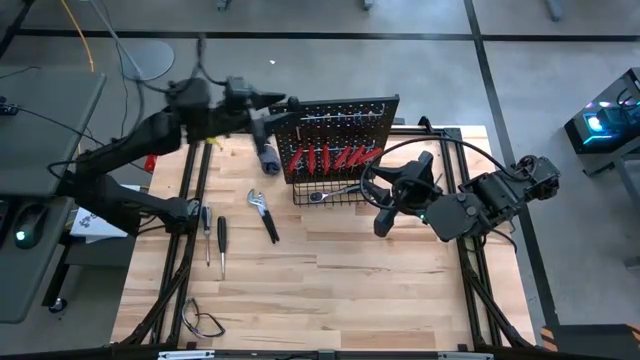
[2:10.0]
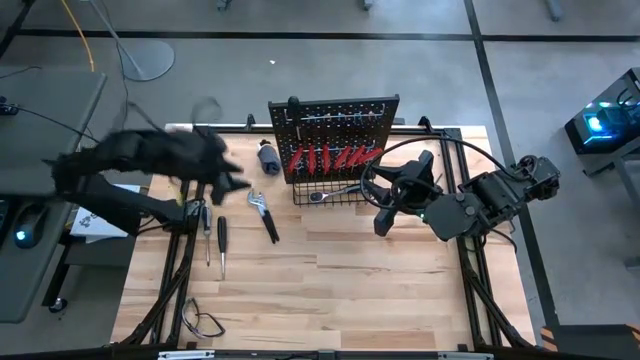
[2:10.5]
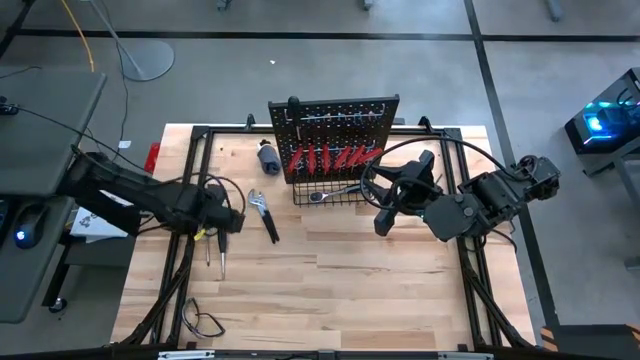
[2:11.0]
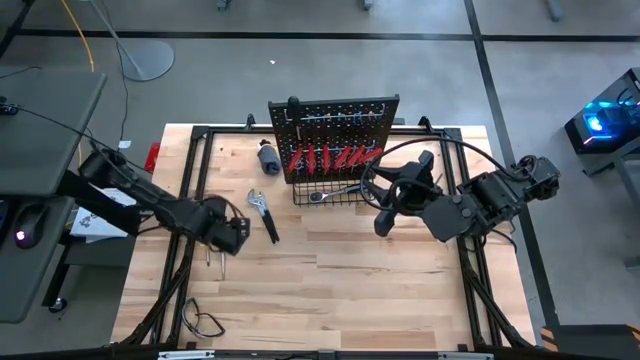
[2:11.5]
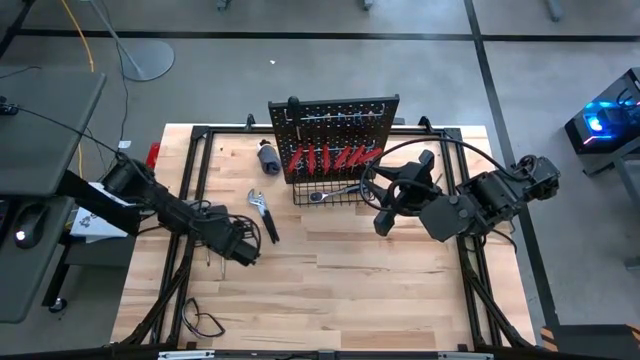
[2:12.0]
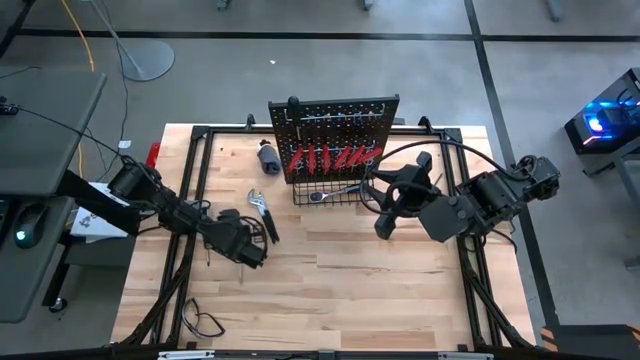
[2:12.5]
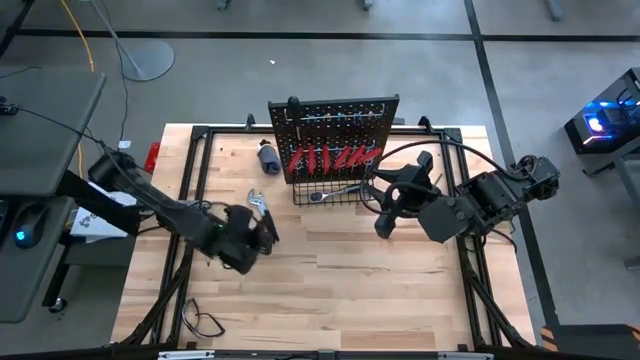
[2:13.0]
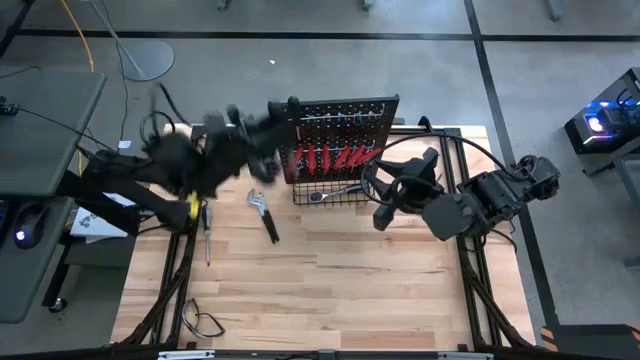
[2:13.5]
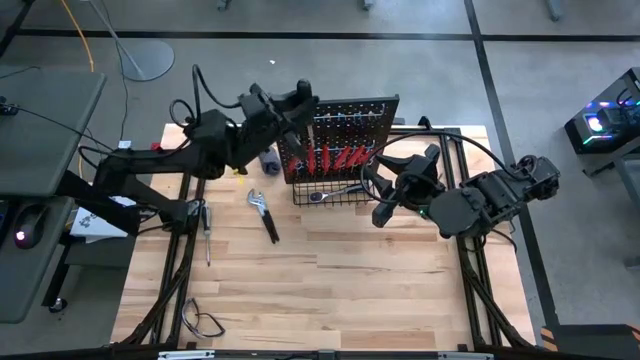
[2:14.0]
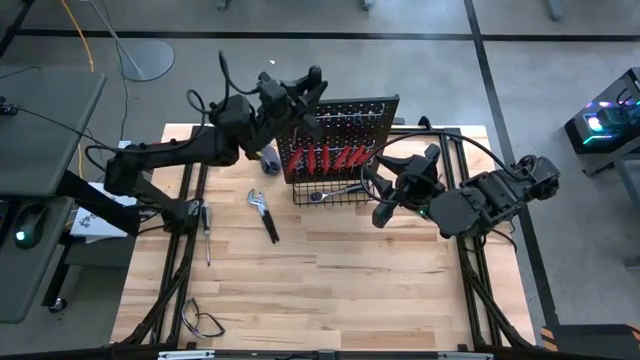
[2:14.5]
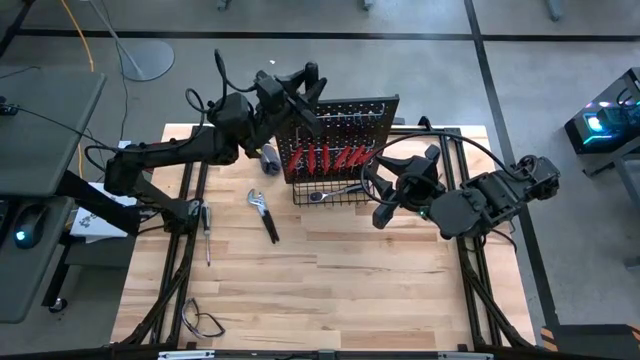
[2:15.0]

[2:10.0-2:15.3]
Task: Hang tools onto peg board
Hang the black screwdriver on the peg board

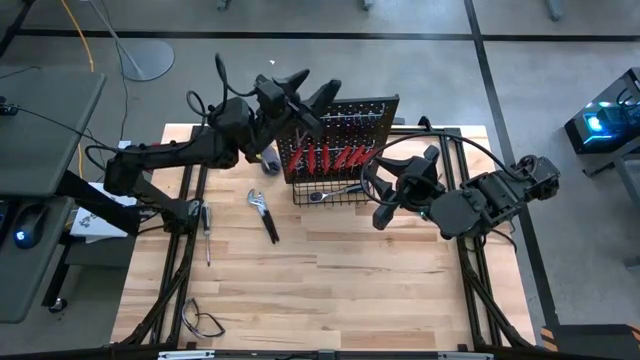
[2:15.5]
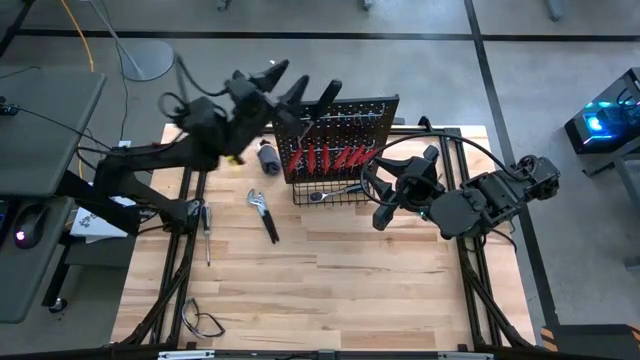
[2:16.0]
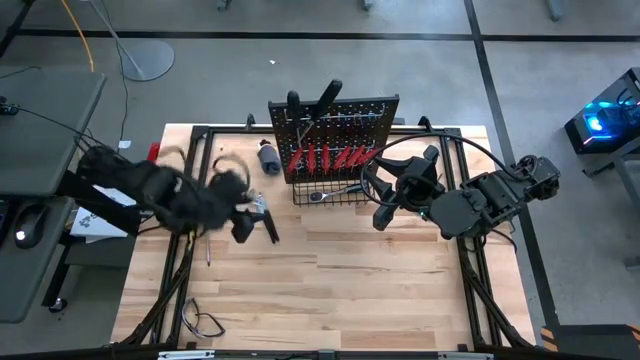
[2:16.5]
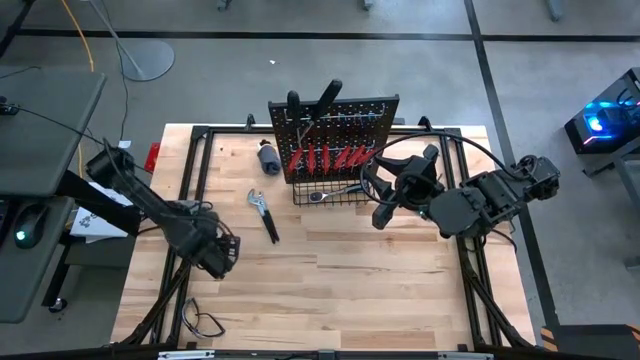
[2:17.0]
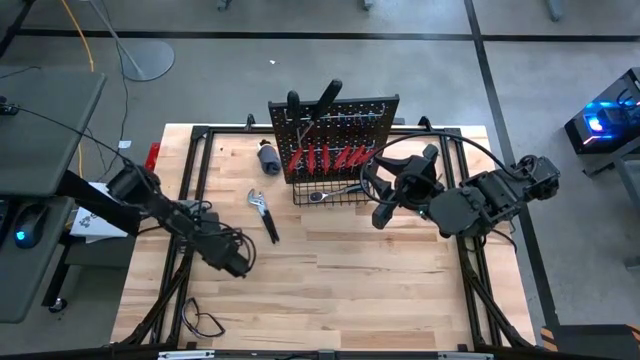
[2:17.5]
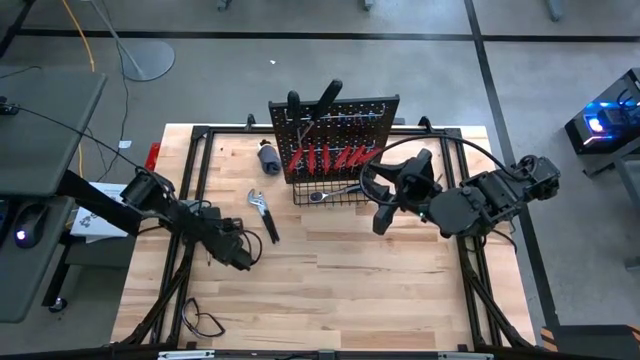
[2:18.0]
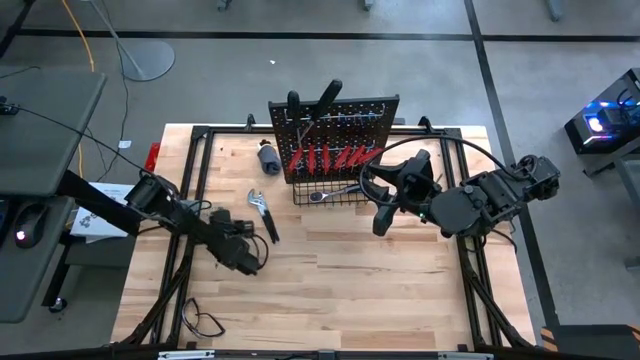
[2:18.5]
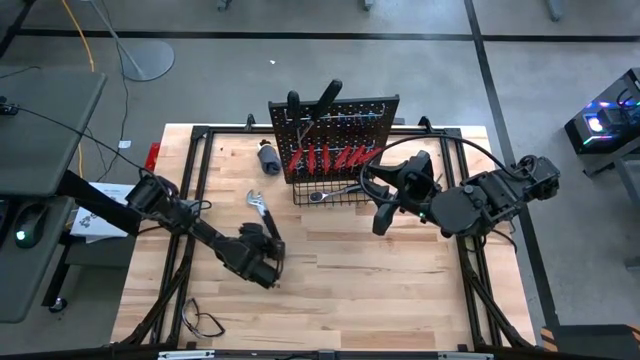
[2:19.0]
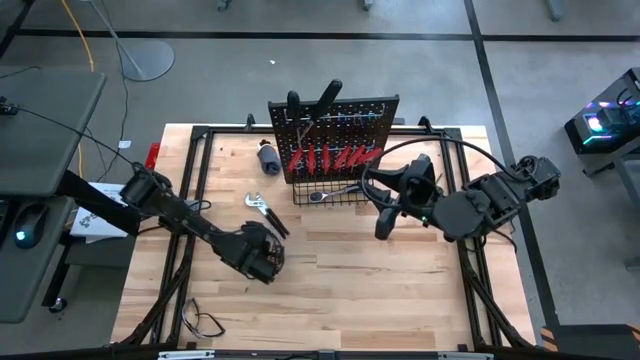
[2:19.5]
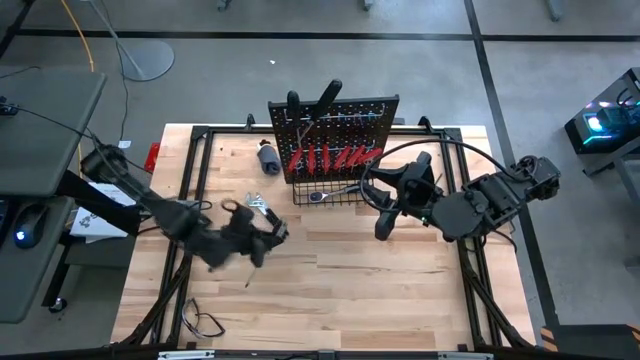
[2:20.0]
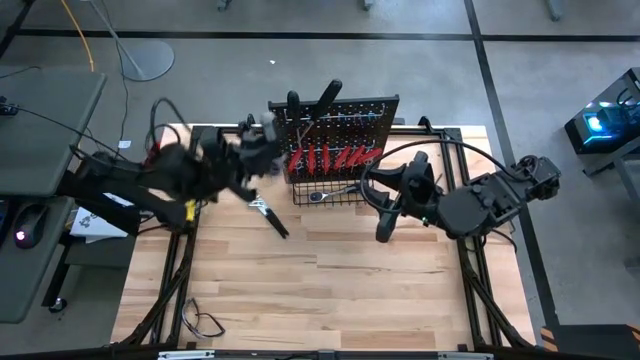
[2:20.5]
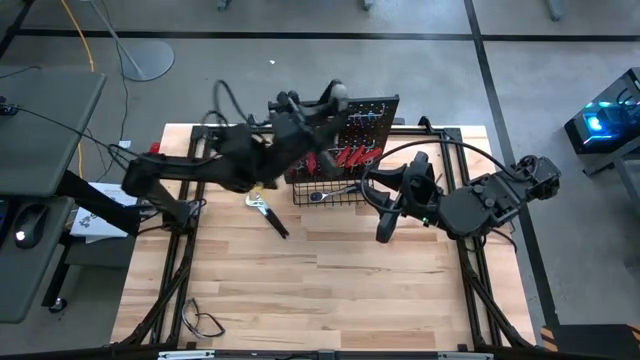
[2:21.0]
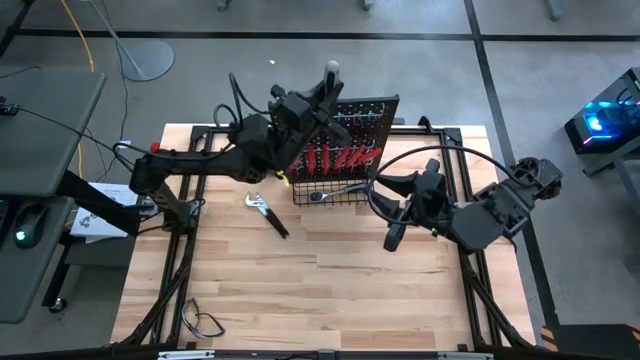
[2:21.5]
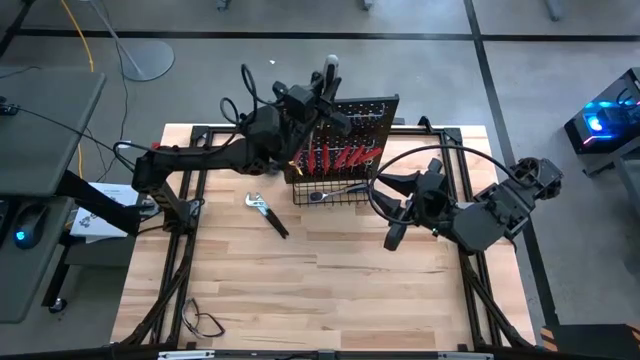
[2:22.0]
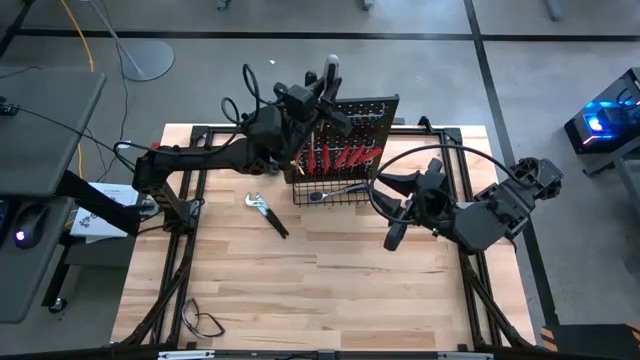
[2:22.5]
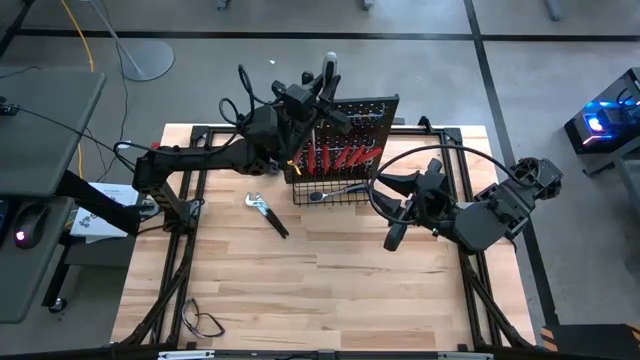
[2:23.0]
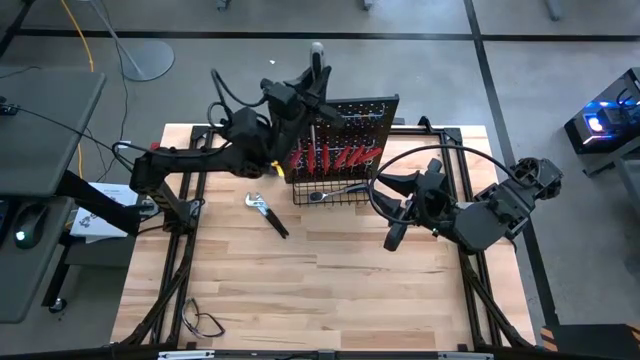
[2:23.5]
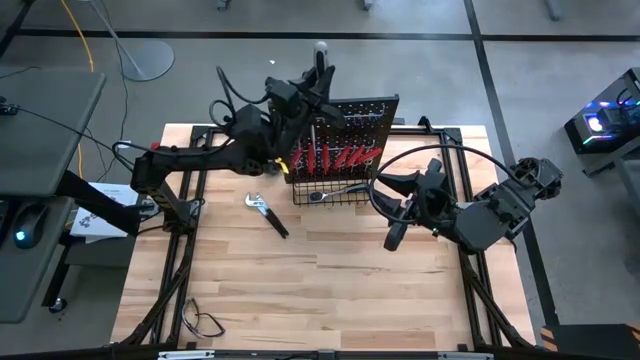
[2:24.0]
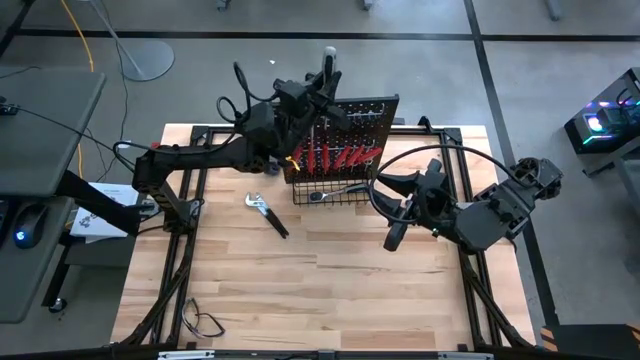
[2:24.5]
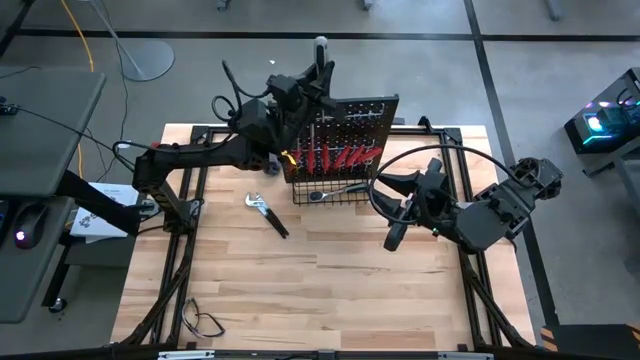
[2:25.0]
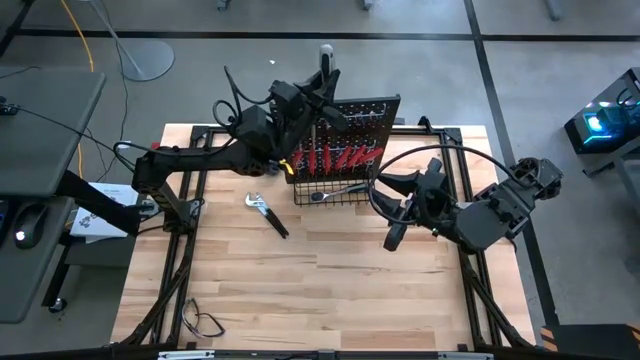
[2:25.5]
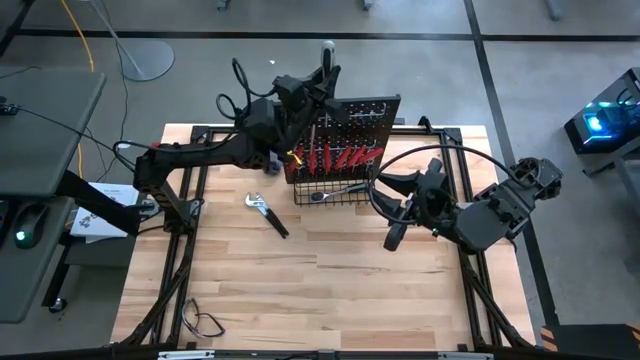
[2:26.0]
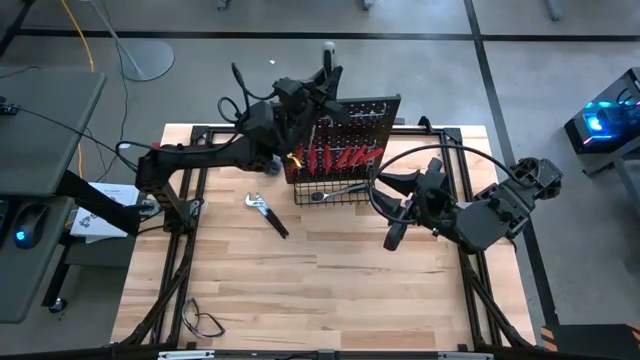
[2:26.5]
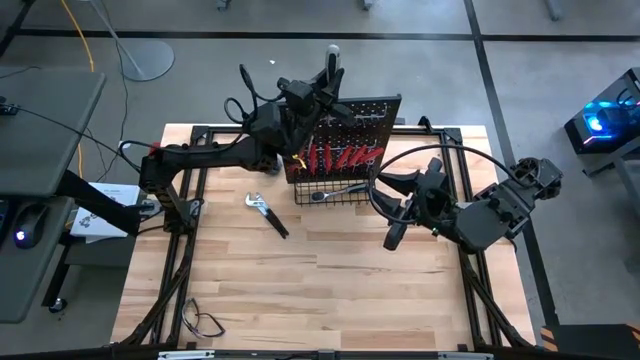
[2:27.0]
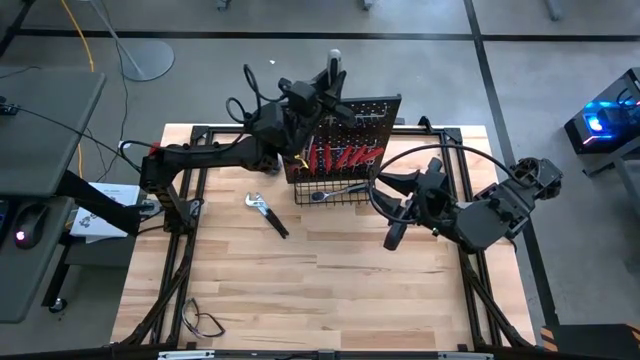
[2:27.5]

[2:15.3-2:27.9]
Hang the gray screwdriver on the peg board
